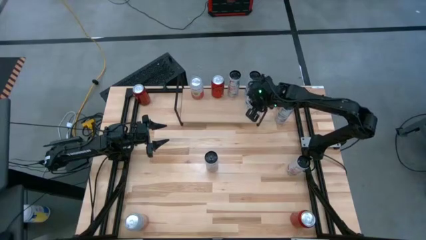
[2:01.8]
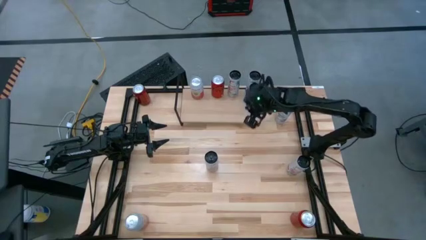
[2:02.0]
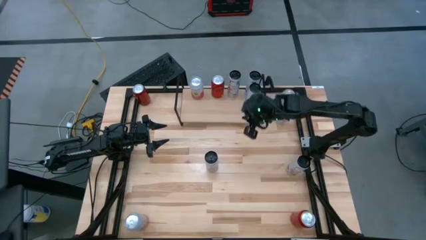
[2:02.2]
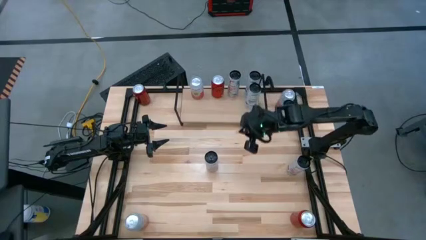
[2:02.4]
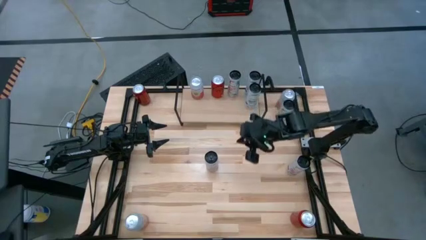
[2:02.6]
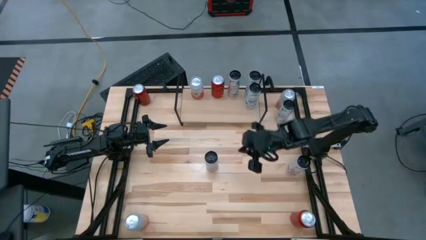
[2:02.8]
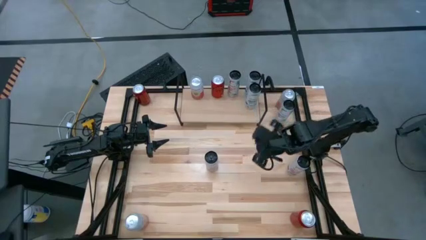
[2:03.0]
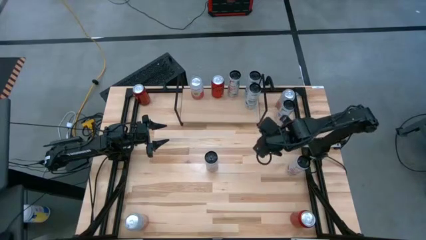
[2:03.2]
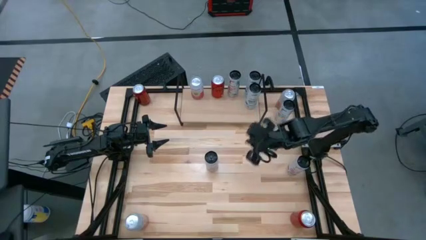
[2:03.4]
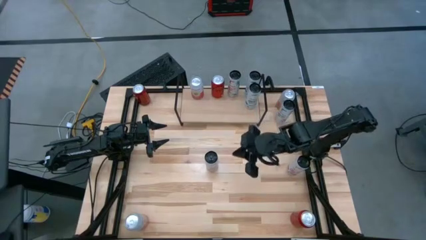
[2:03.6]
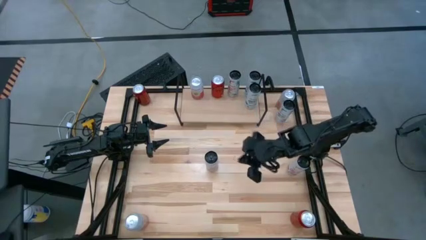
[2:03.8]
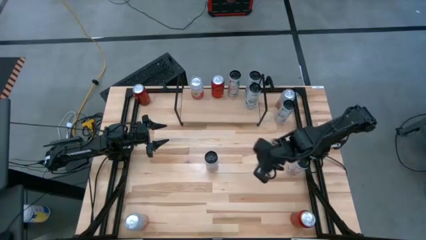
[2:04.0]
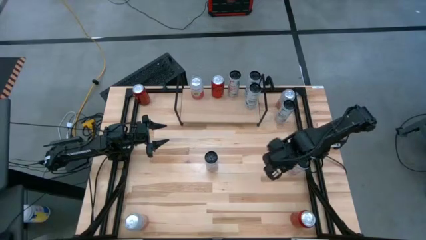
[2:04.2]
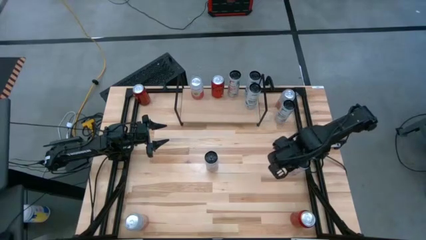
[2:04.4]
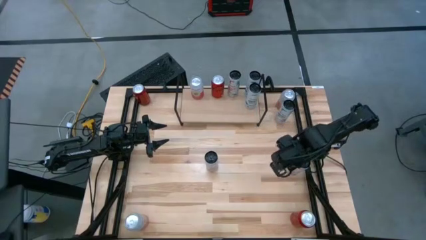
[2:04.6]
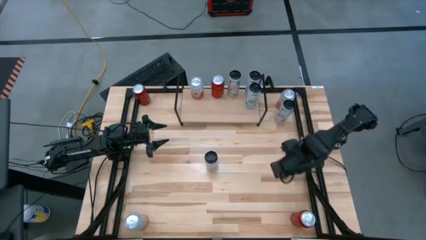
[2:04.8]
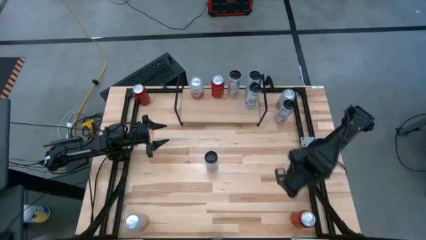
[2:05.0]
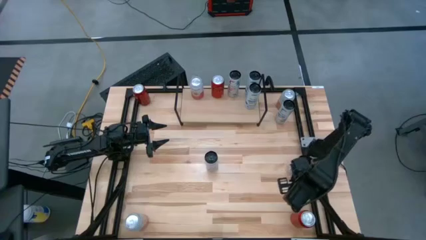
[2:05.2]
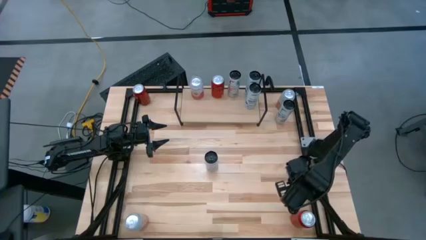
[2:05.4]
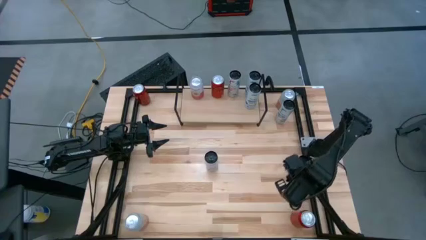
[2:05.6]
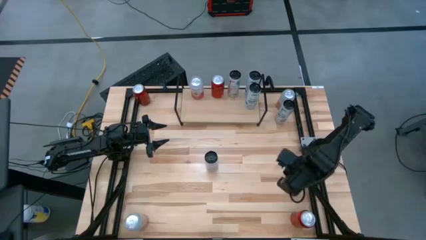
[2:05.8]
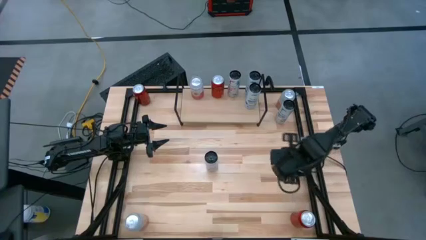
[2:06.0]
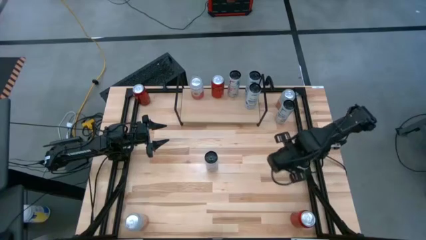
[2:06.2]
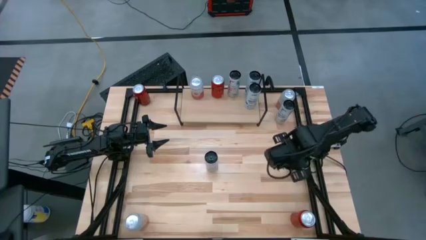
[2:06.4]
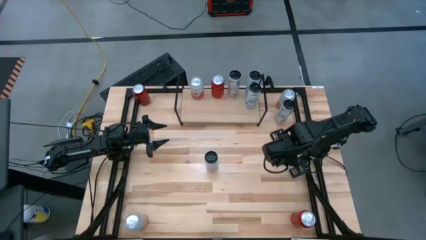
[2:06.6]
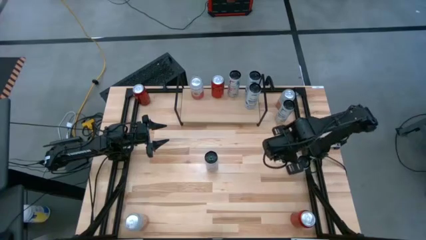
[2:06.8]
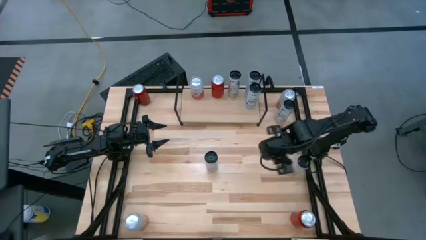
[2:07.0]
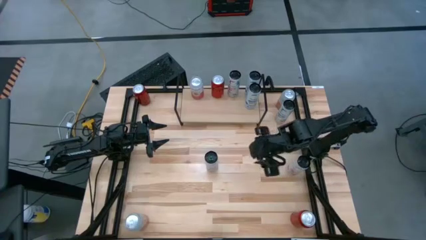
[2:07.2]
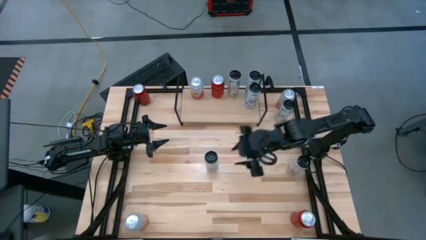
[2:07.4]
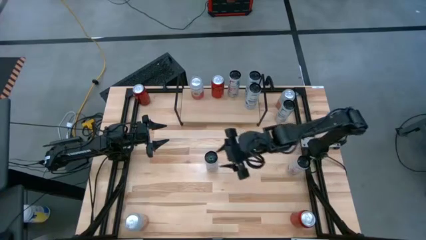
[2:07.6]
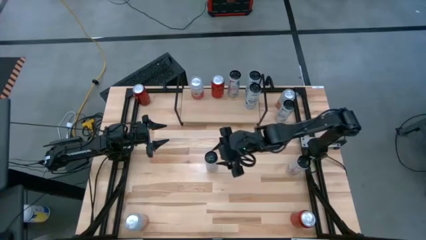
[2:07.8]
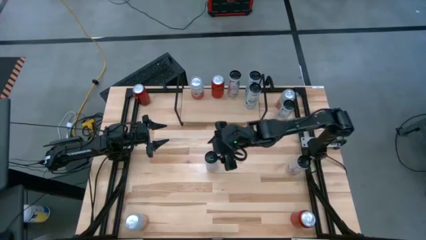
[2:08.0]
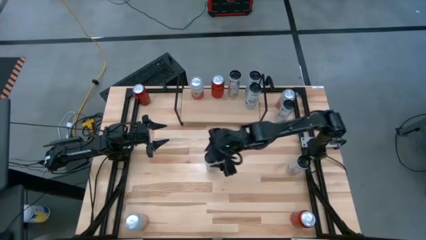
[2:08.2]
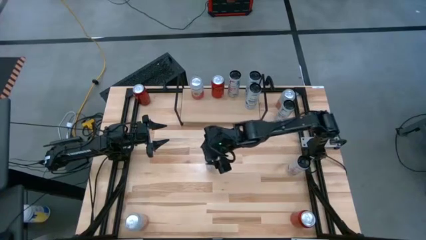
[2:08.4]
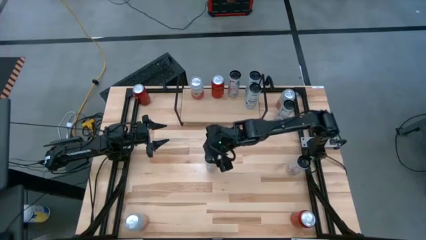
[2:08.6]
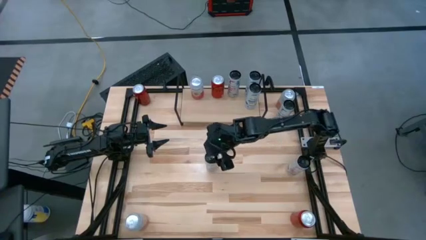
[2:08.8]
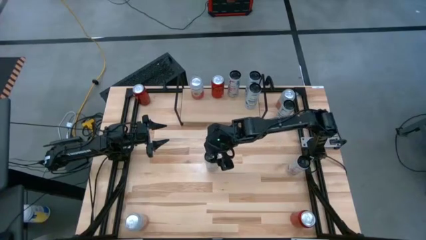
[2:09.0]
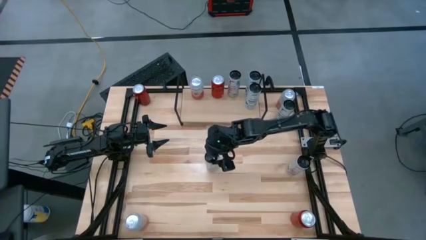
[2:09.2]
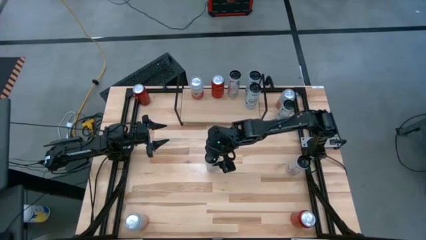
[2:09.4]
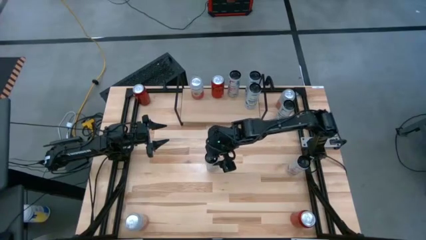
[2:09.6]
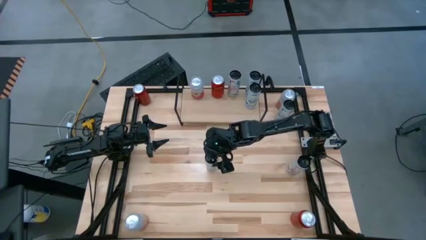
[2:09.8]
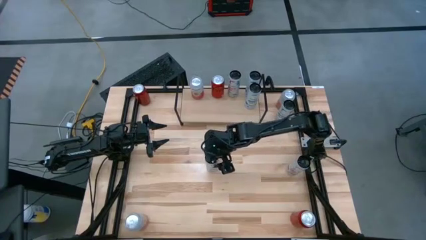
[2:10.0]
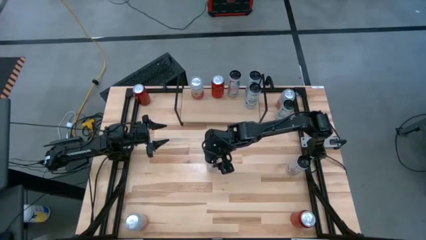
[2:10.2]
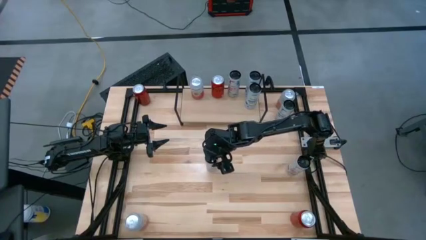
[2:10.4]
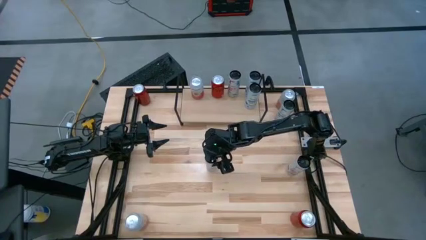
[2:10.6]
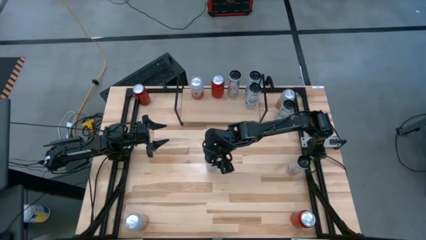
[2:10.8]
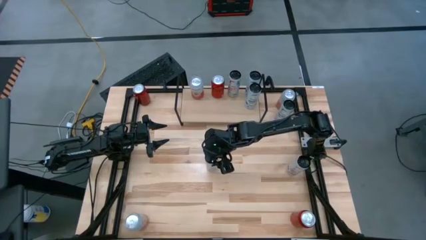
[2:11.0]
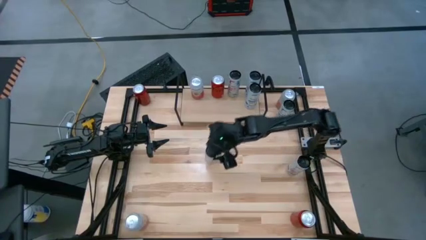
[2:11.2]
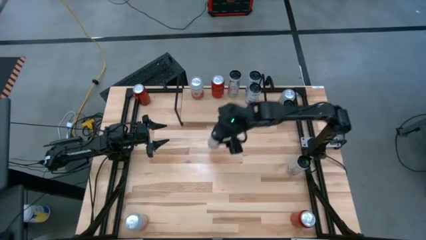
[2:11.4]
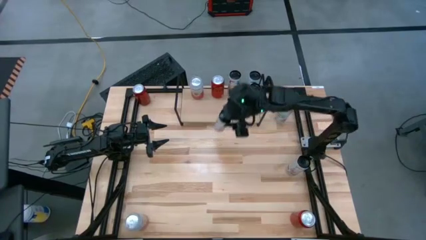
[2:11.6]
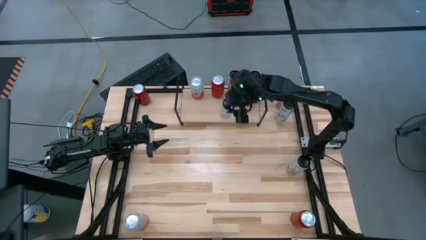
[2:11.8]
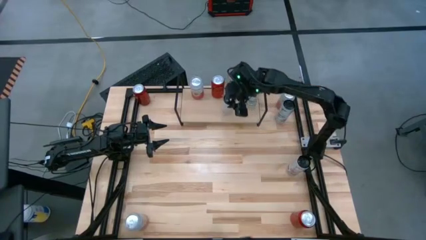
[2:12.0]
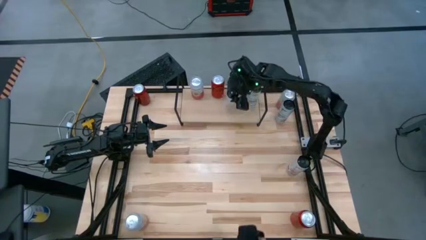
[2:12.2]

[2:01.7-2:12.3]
Task: Place canned beverage on shelf
Put the left white pink soda can on the shelf aligned with the other white pink soda can

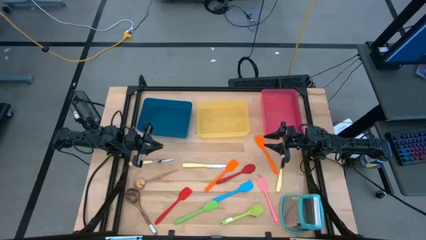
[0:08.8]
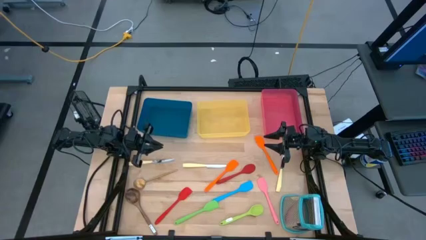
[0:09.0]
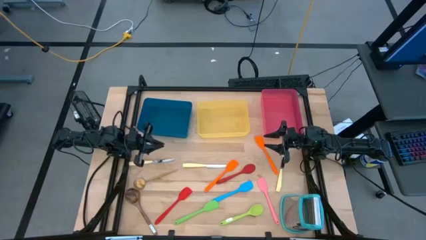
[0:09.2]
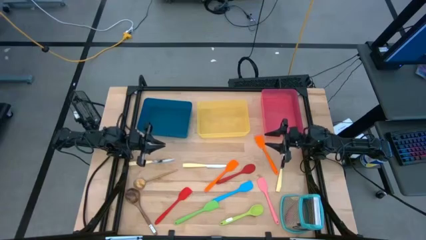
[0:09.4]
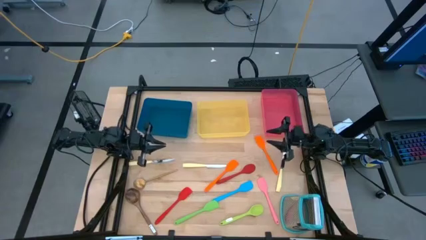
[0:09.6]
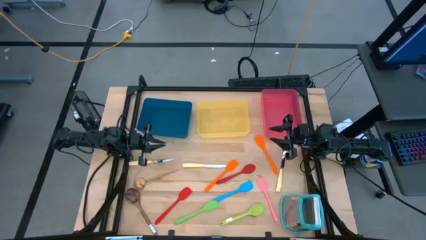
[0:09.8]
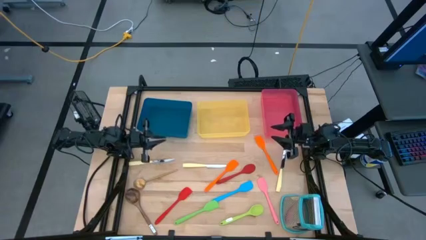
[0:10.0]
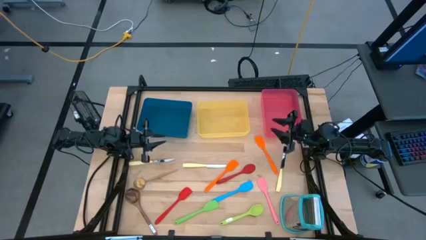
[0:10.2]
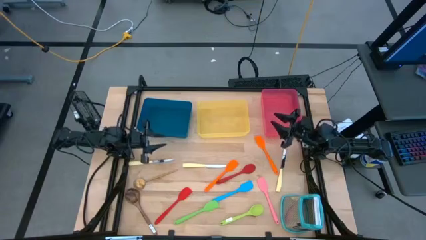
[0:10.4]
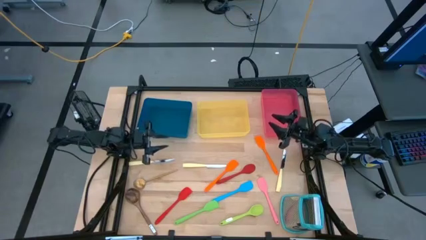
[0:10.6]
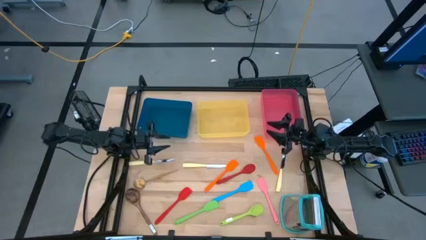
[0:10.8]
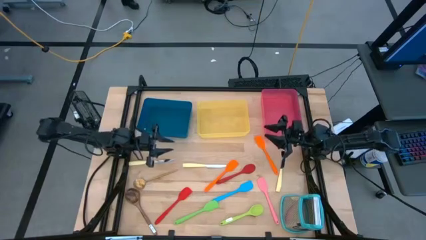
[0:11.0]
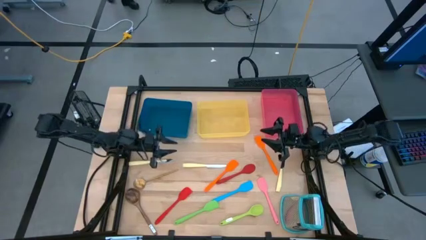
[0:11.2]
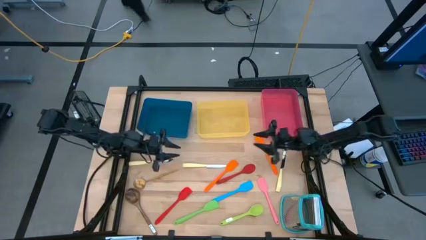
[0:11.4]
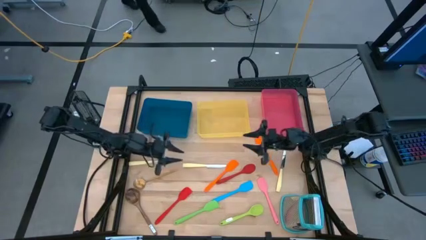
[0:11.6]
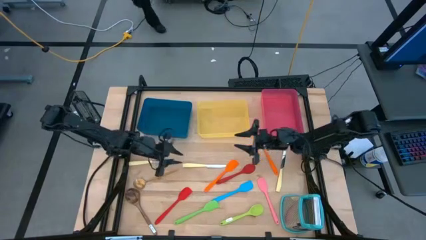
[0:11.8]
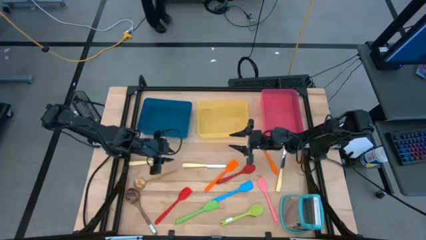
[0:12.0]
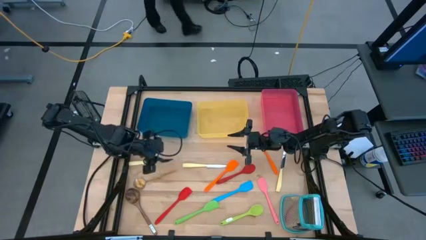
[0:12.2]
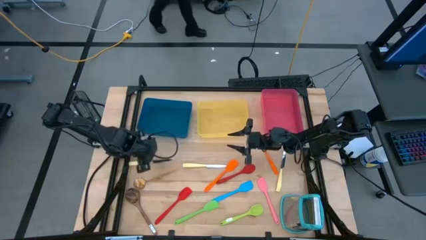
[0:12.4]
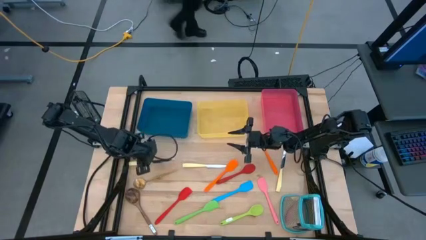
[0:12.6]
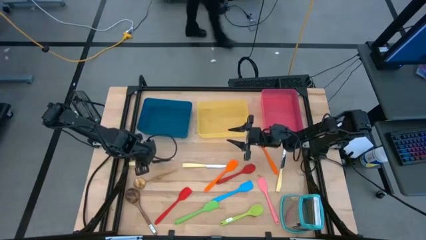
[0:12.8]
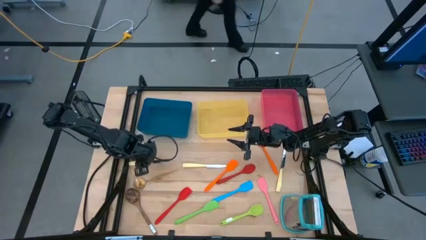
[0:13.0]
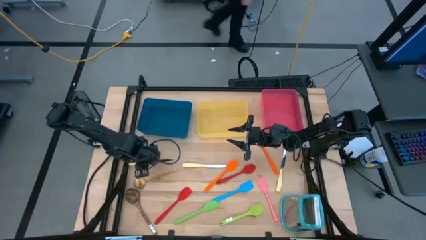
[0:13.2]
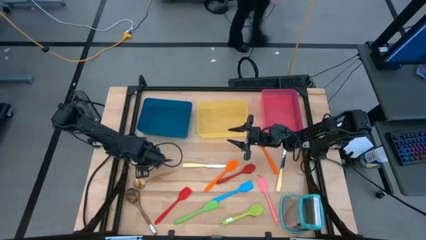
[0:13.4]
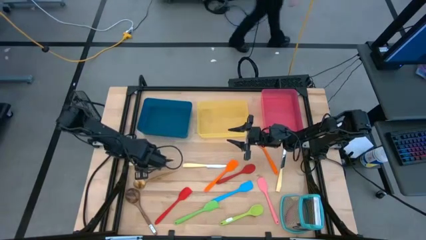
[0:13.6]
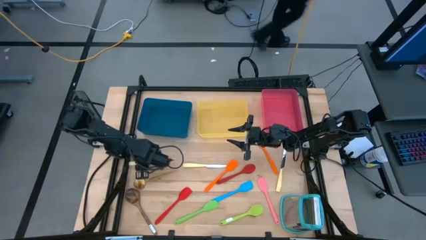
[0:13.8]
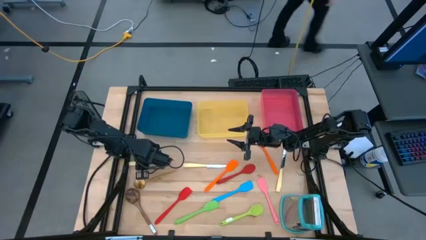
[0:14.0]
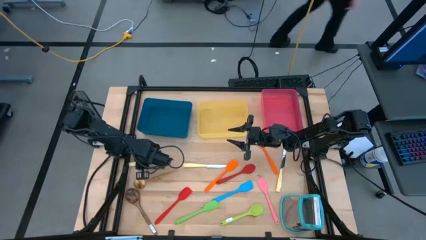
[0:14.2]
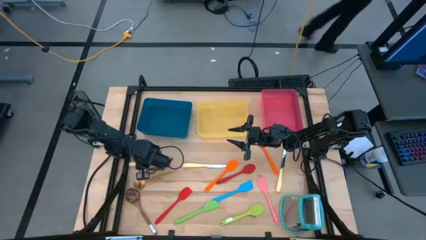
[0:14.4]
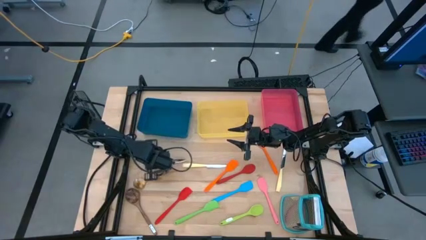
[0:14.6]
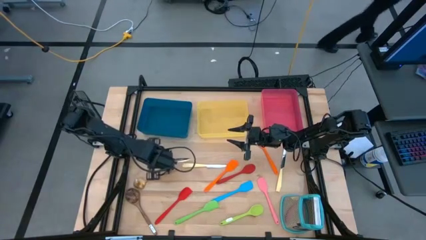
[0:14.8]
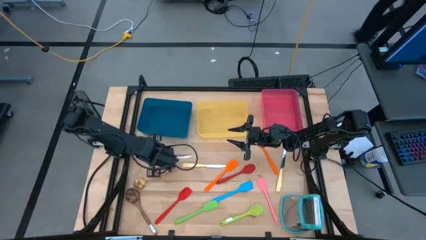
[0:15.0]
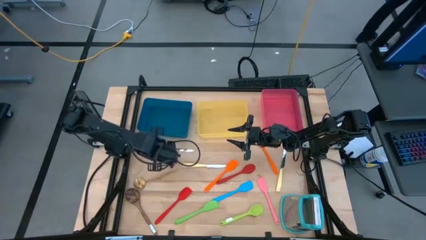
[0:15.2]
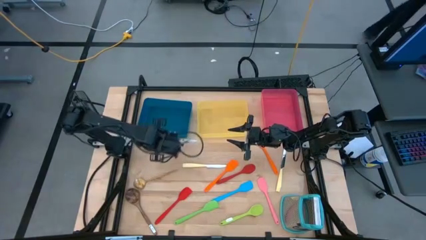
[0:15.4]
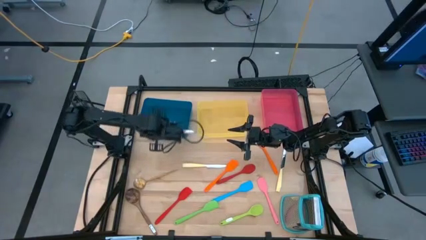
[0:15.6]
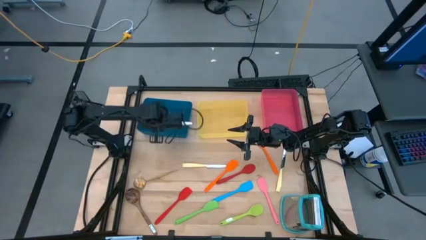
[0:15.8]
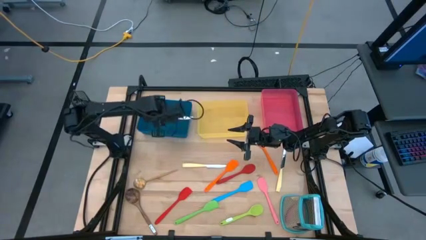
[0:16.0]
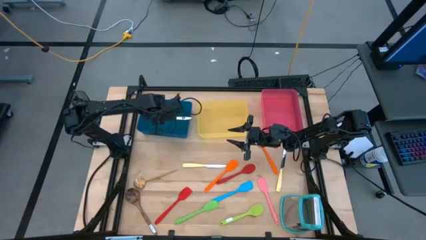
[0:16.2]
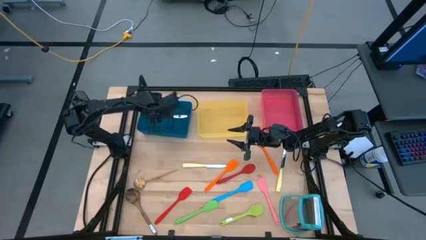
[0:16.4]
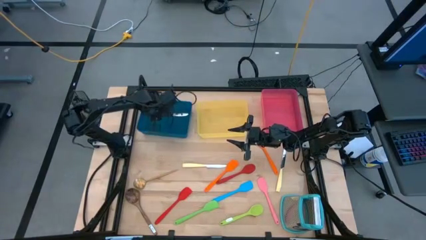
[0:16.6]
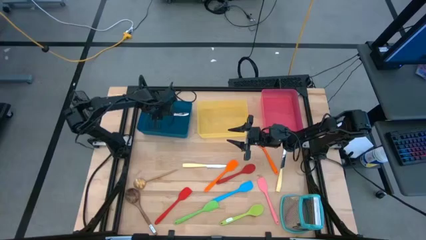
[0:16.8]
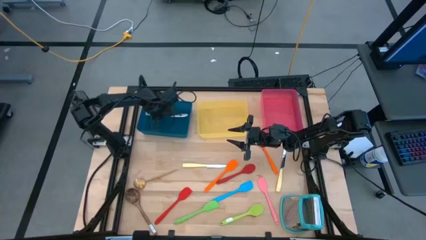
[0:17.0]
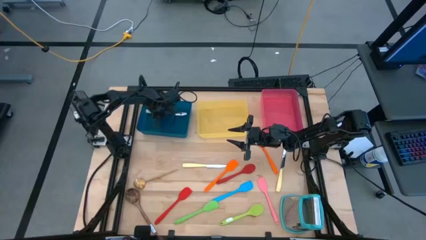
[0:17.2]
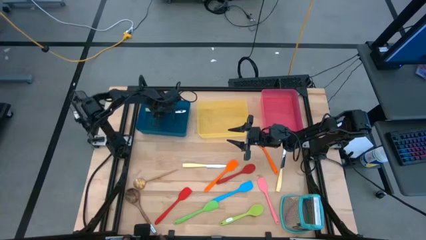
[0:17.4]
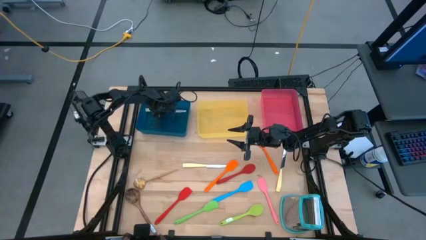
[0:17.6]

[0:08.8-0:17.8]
Task: Pick & Place Kitchen Items
Put the left yellow knife into the blue bin
